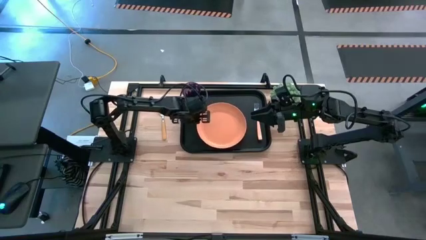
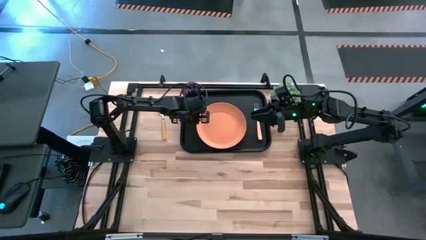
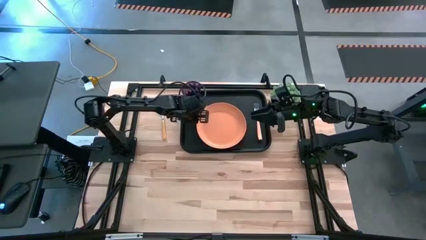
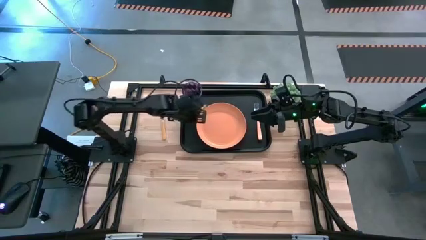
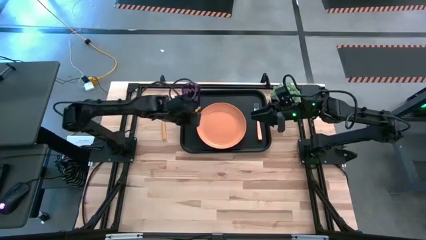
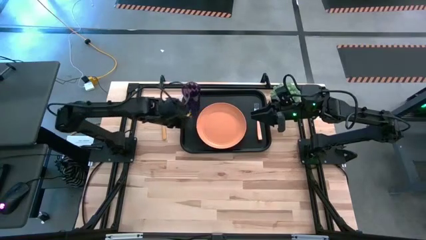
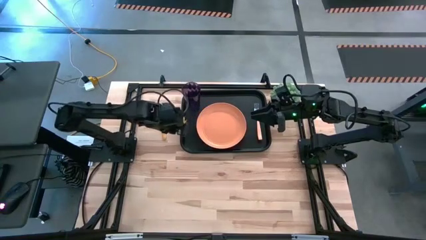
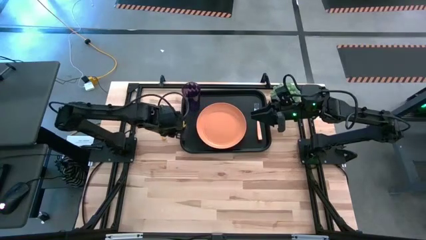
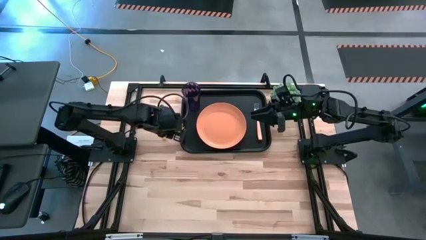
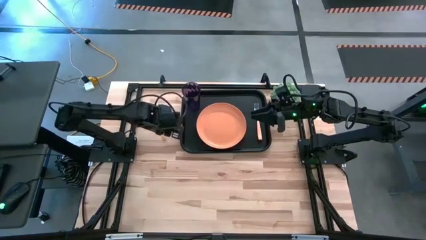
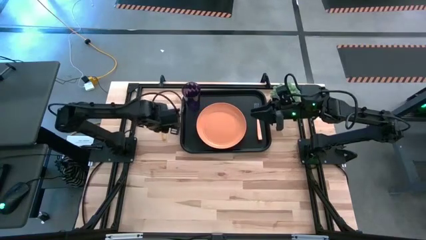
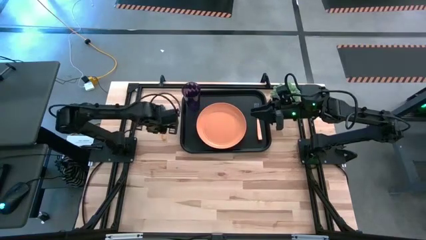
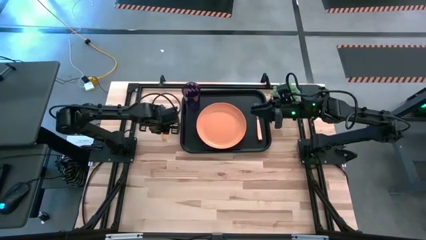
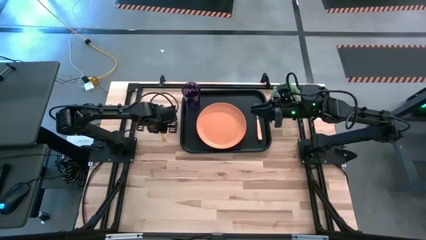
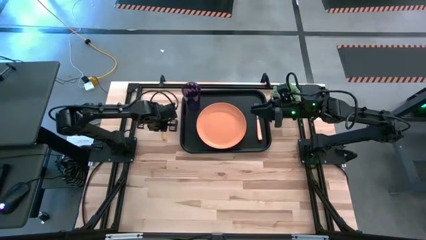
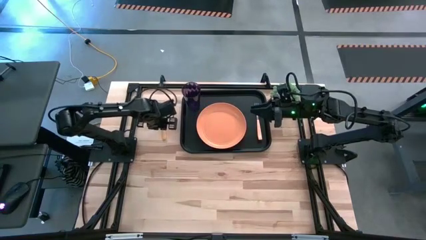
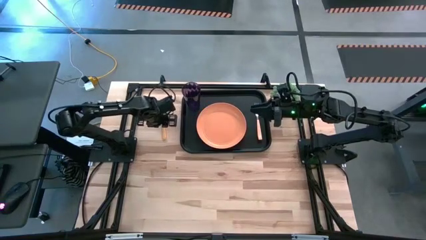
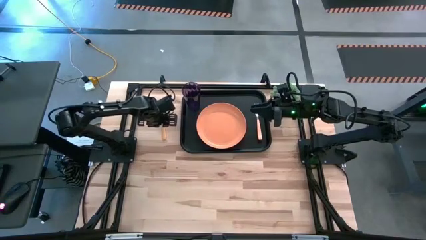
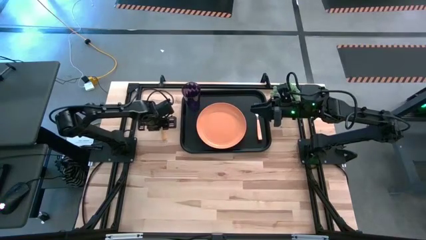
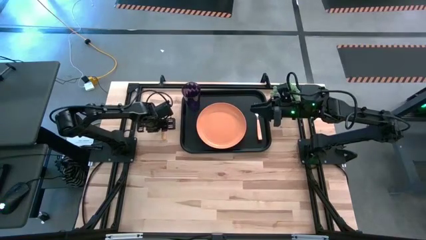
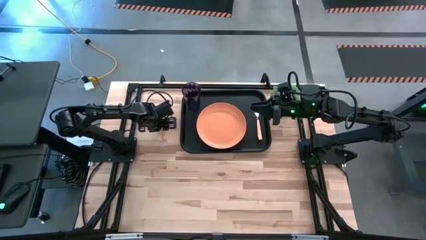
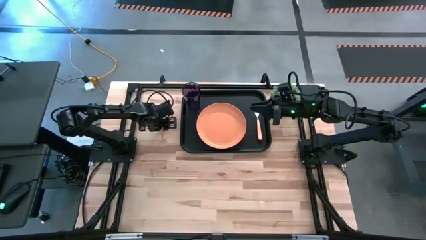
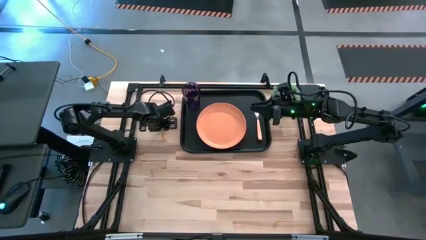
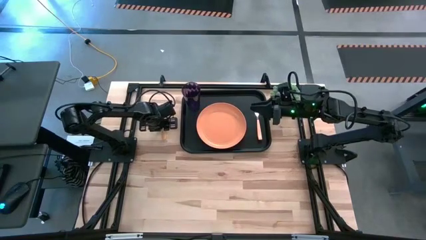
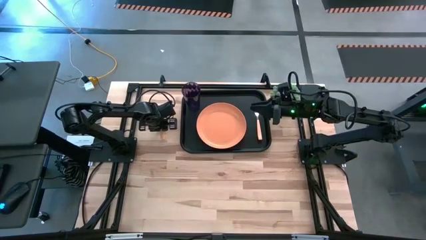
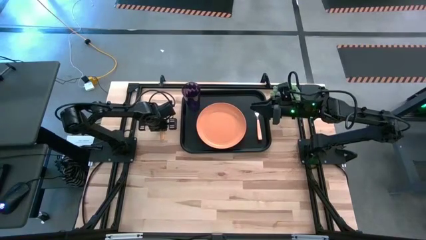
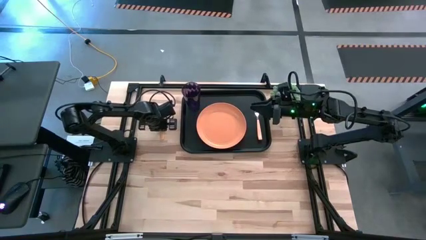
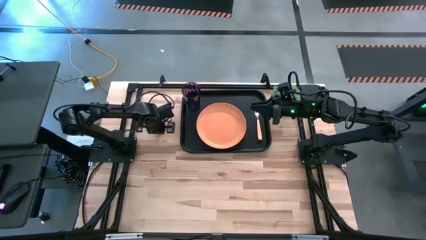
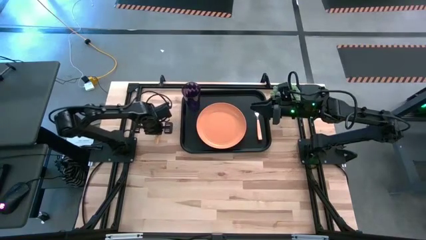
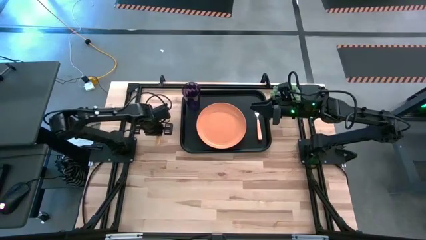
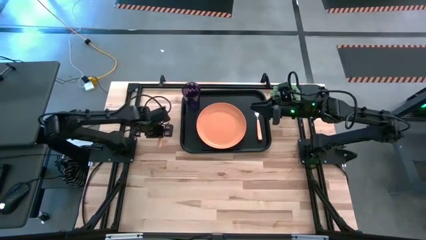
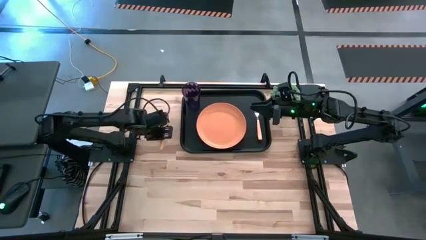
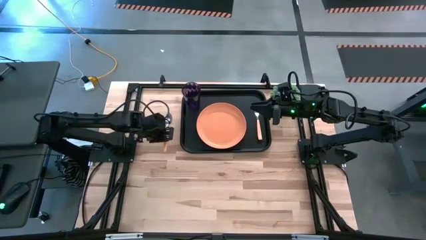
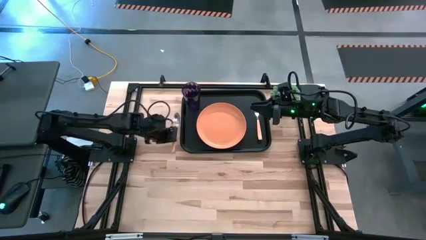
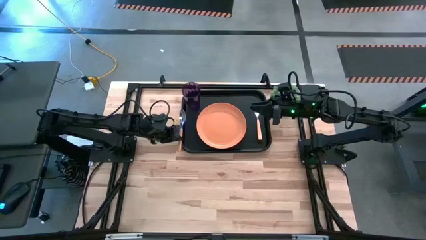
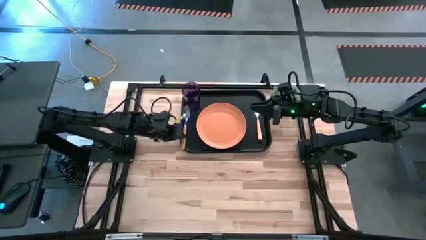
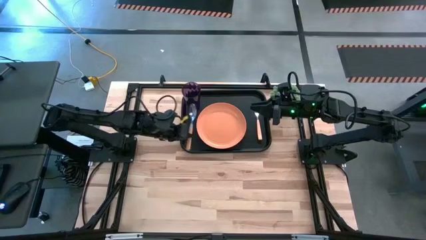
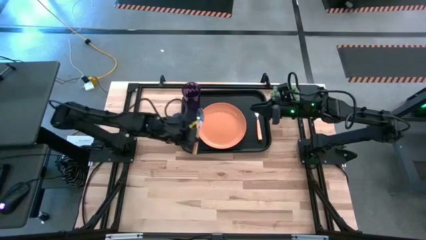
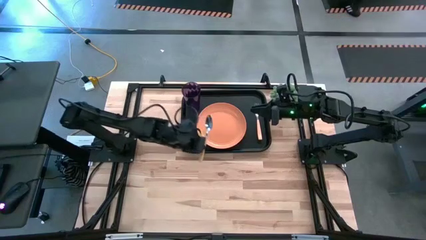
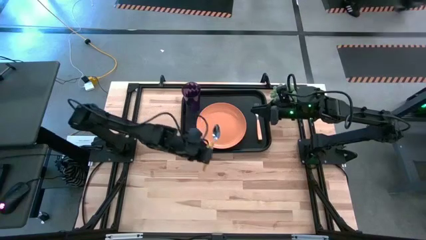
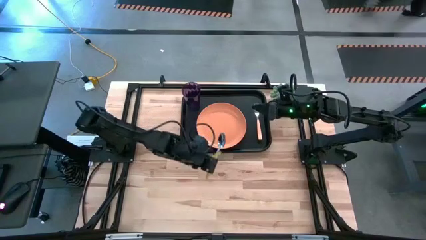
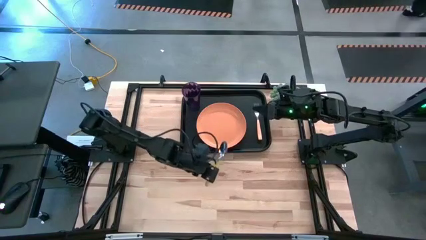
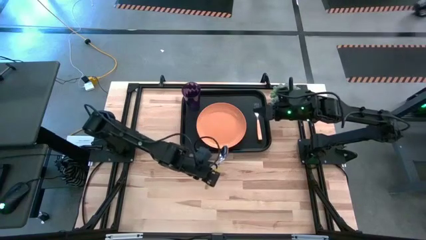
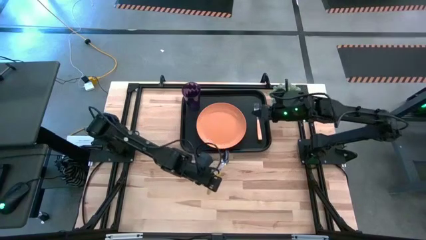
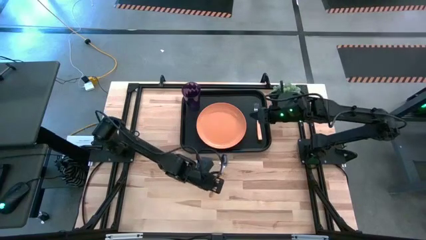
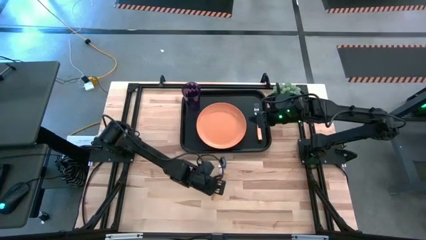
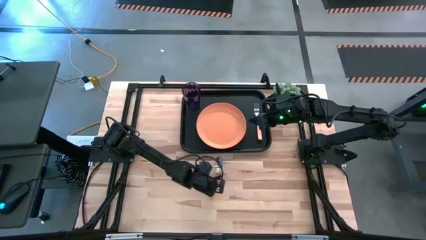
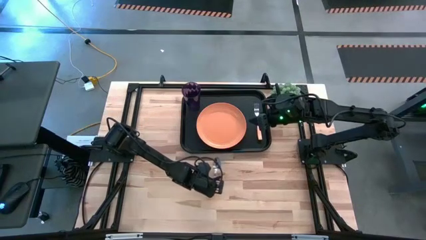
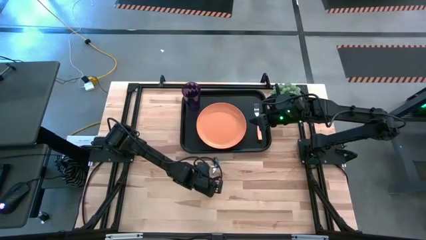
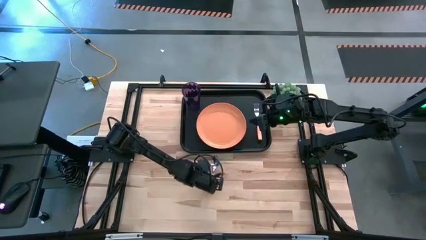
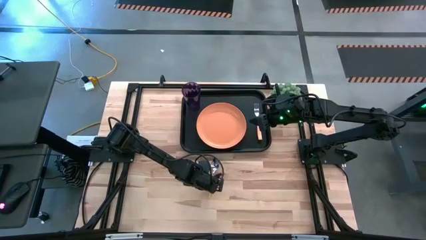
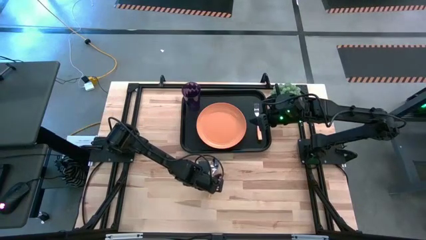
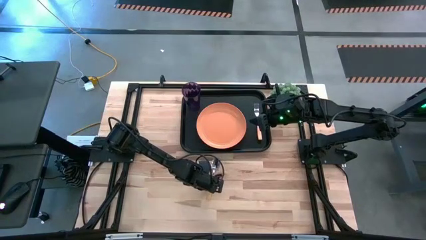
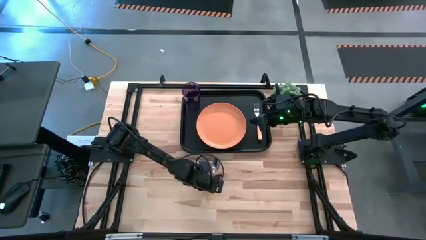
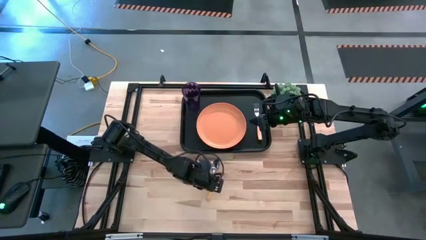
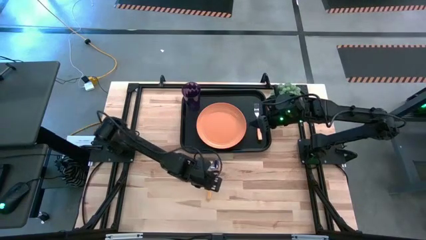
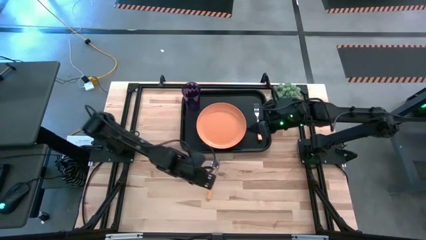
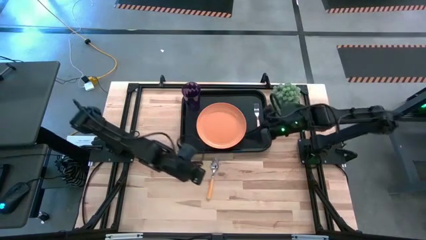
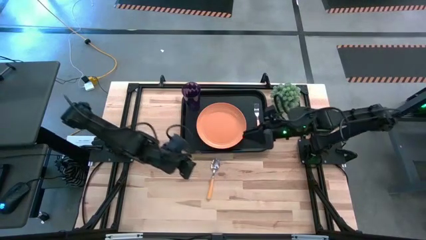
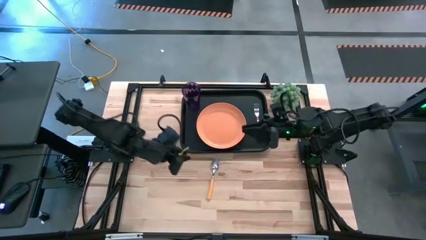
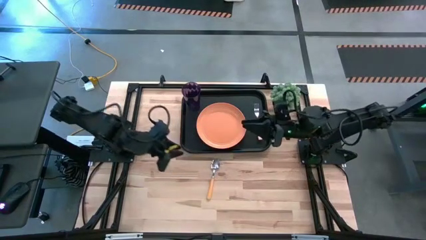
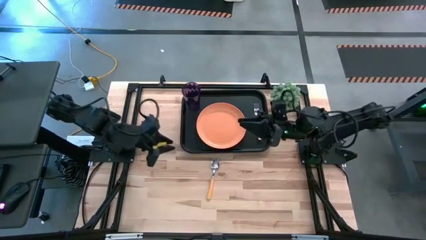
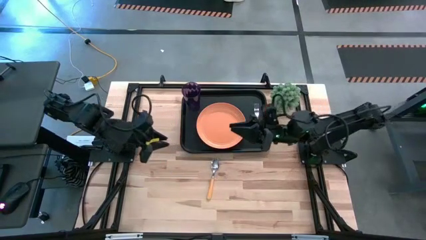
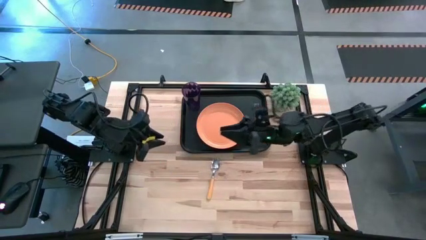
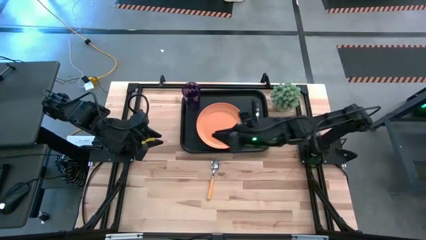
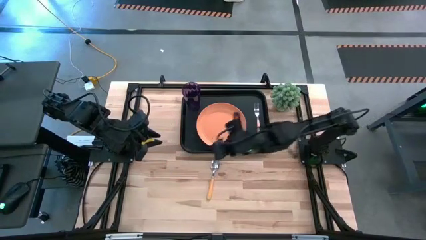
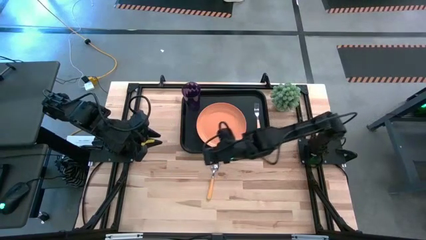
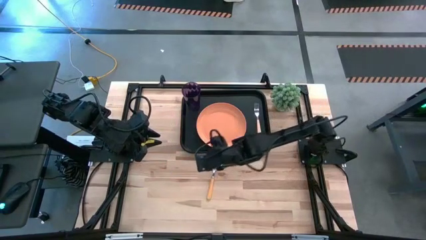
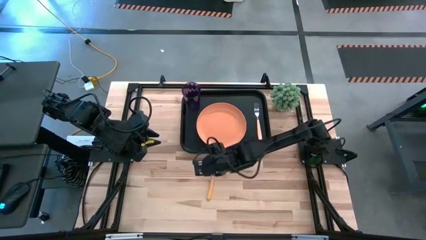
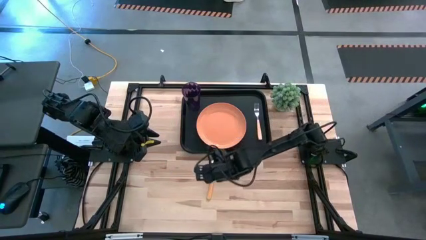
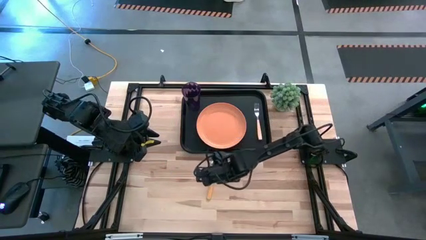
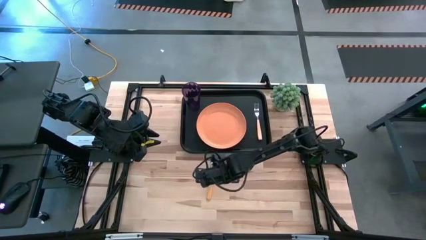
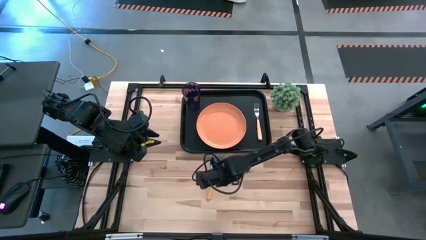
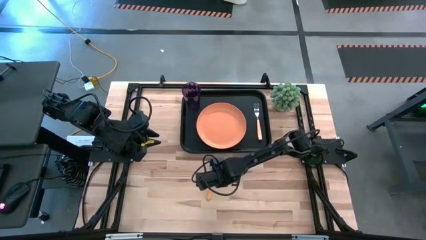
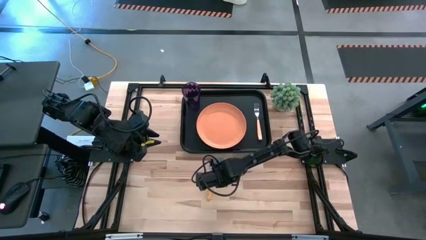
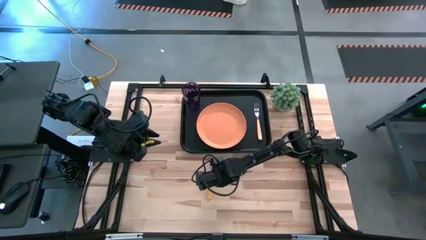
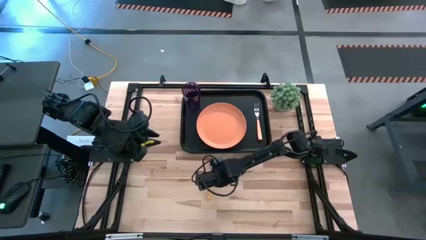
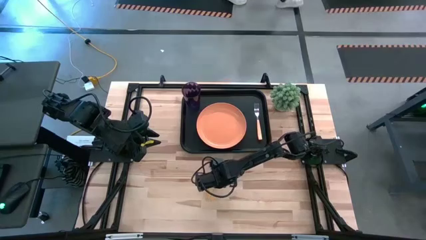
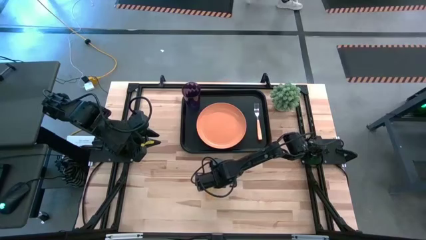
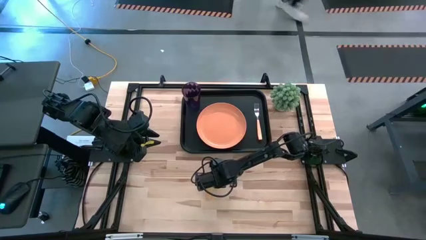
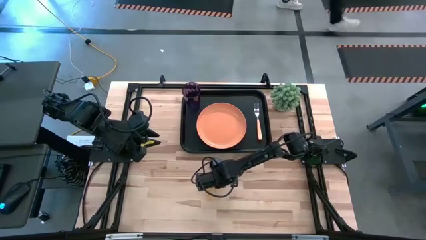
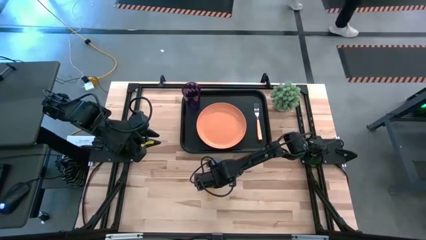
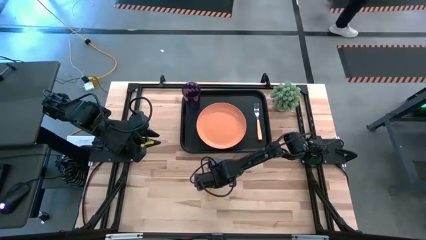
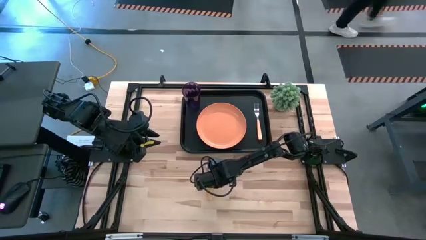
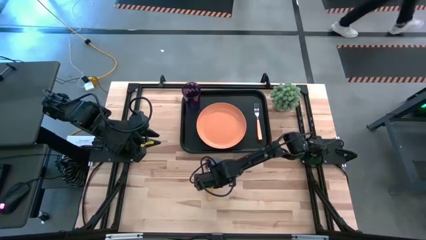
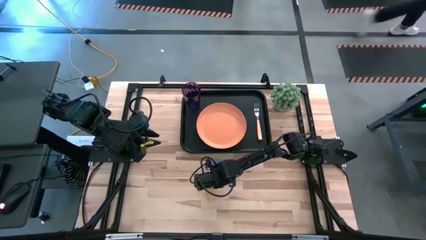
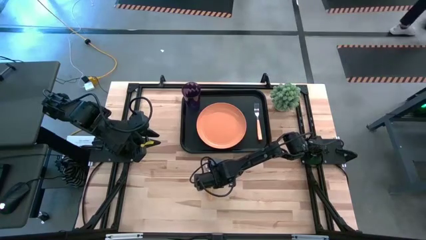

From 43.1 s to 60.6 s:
Task: Pick and place plate/cup/fork/spoon on tray
Put the yellow spoon to the right of the orange plate on the black serving tray
